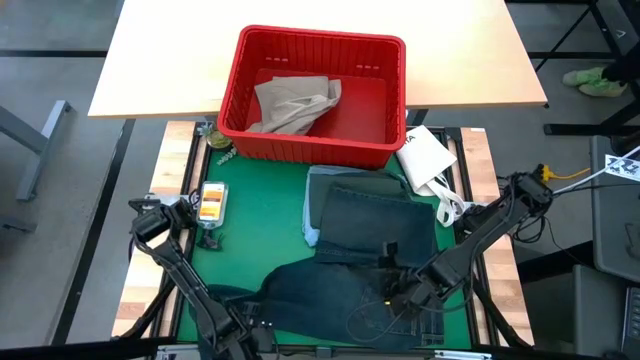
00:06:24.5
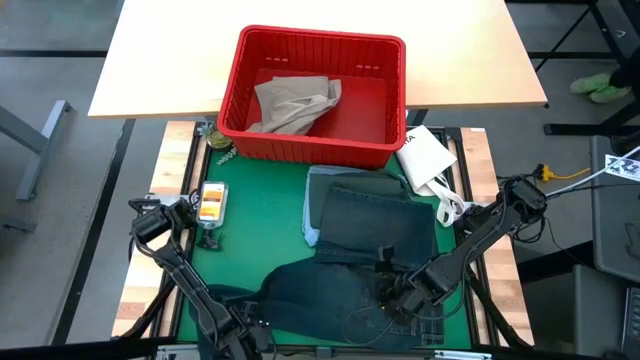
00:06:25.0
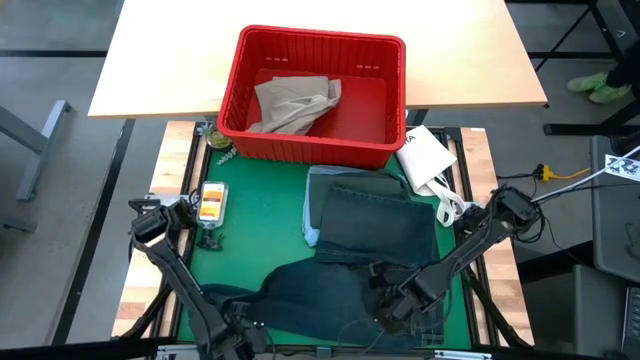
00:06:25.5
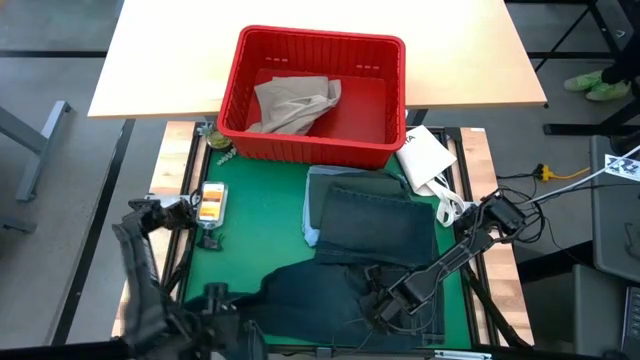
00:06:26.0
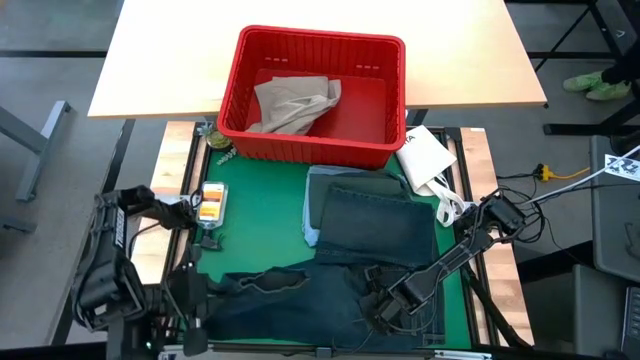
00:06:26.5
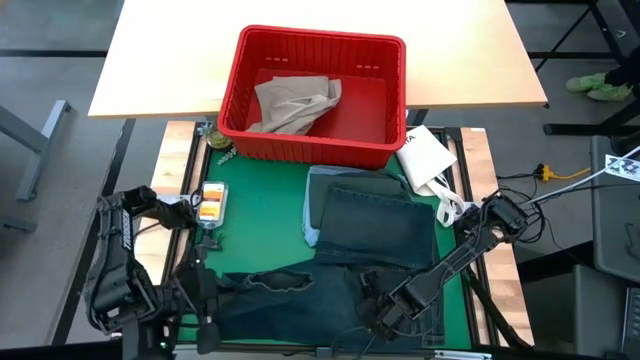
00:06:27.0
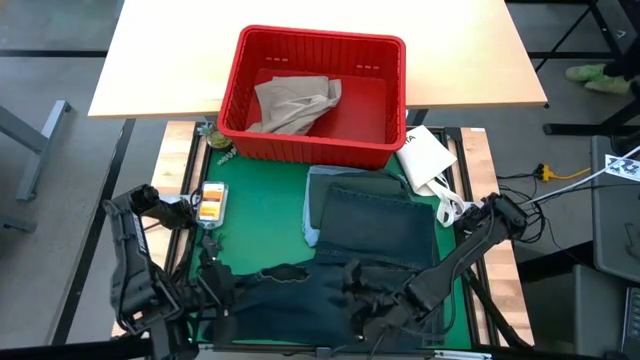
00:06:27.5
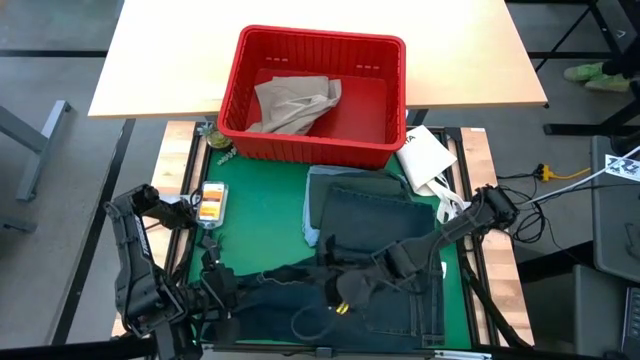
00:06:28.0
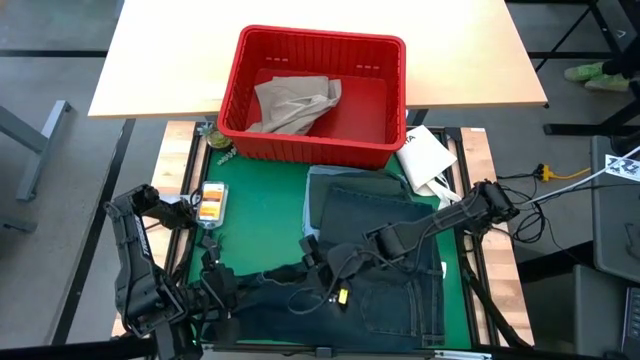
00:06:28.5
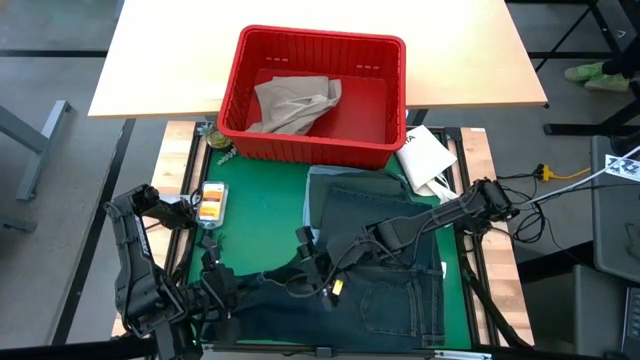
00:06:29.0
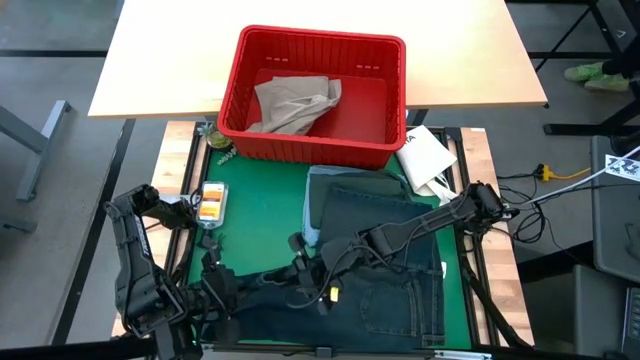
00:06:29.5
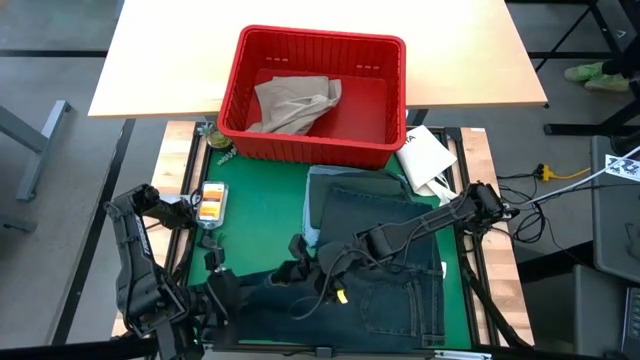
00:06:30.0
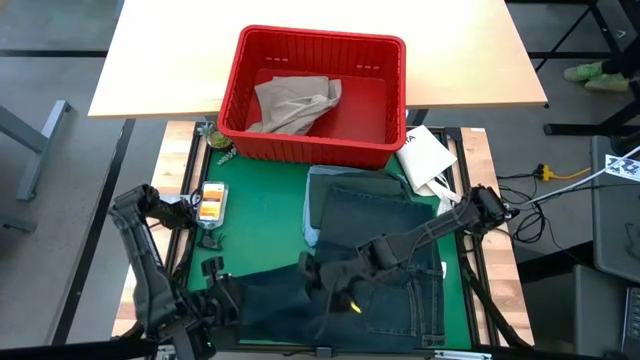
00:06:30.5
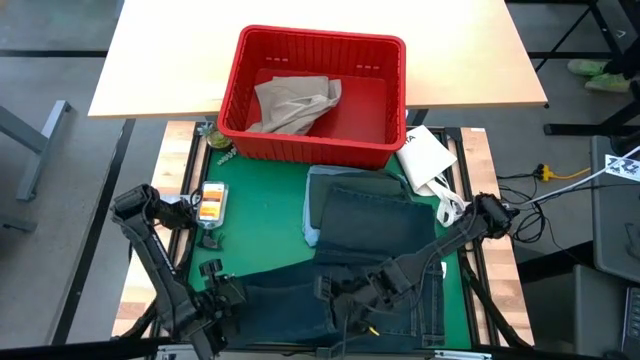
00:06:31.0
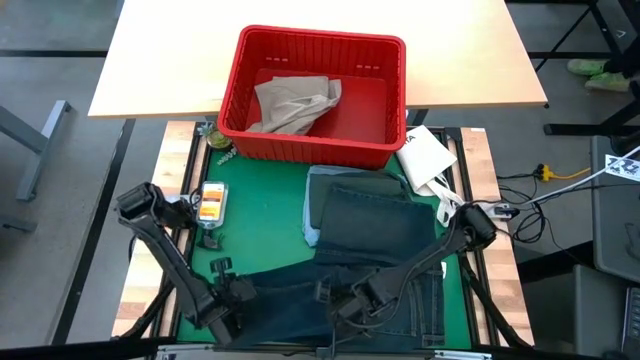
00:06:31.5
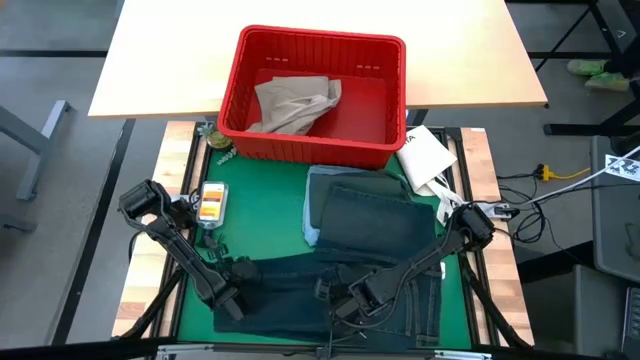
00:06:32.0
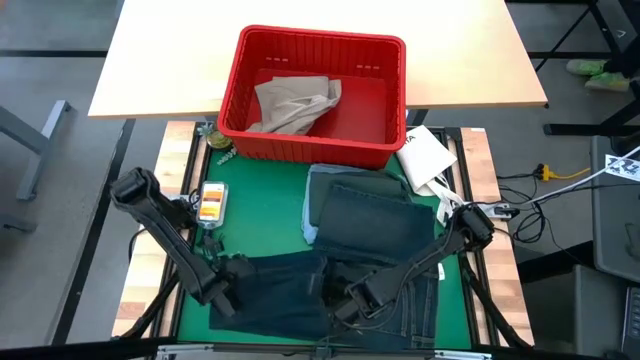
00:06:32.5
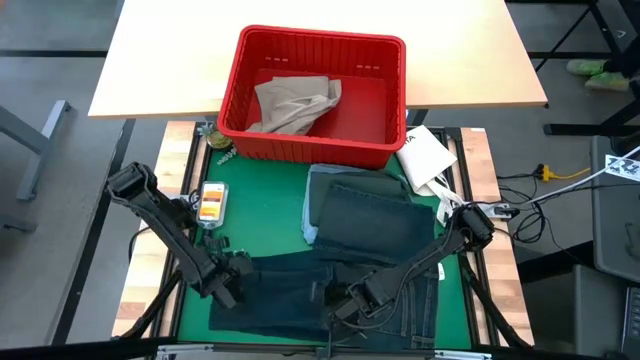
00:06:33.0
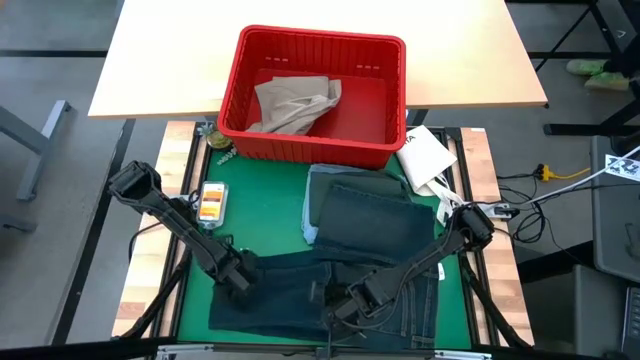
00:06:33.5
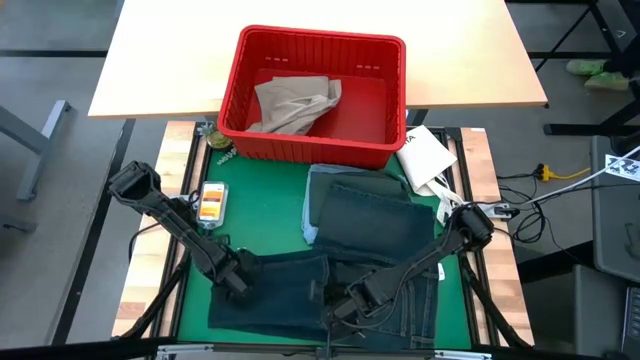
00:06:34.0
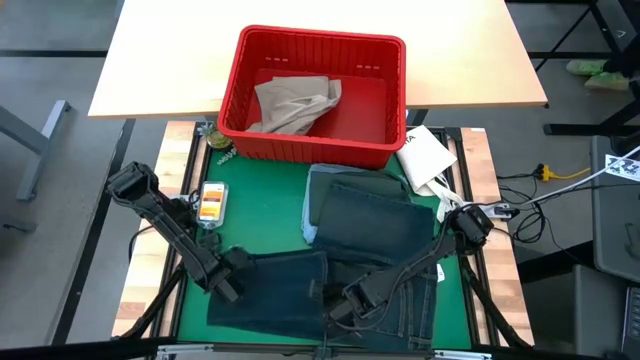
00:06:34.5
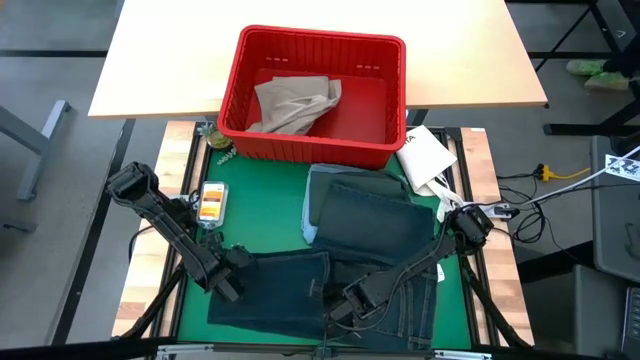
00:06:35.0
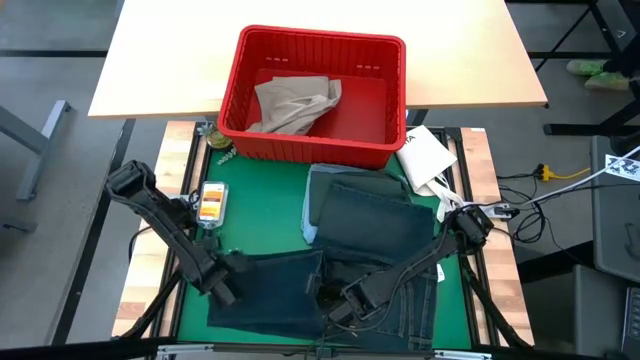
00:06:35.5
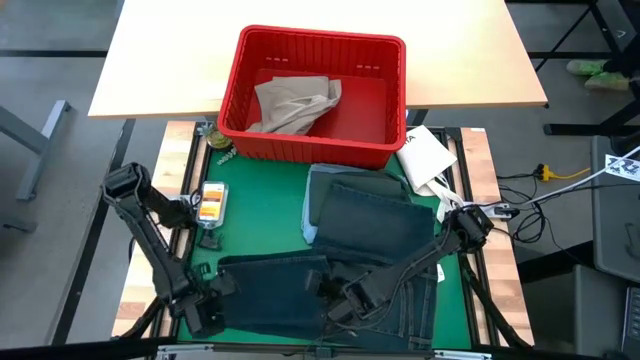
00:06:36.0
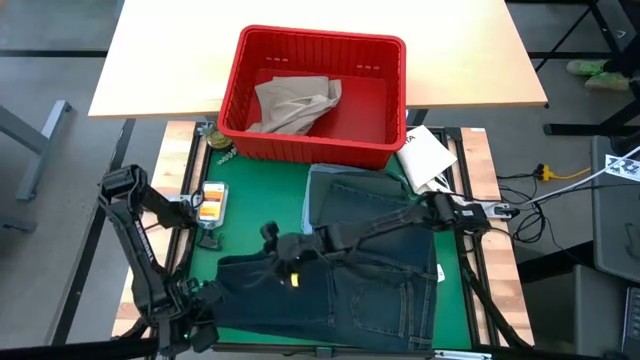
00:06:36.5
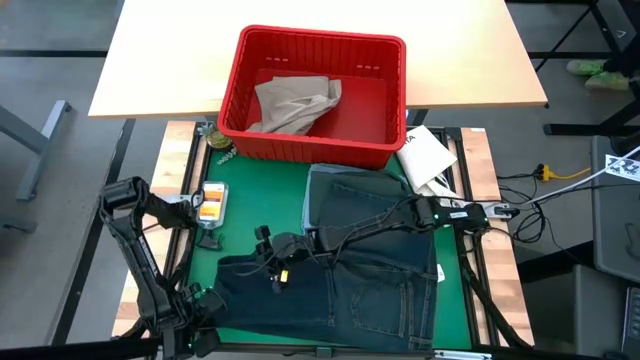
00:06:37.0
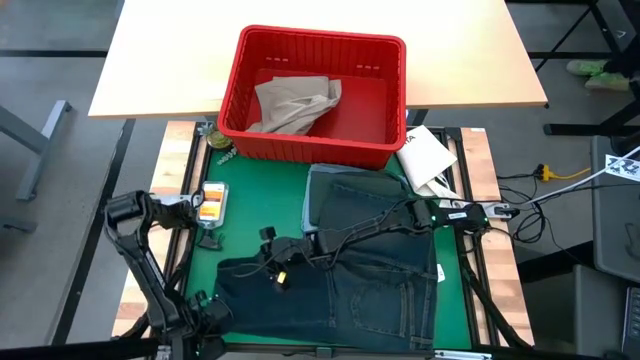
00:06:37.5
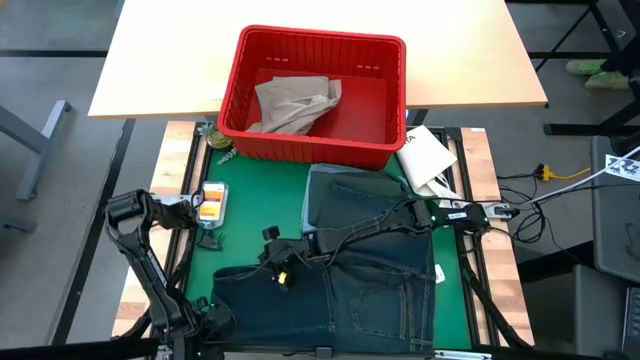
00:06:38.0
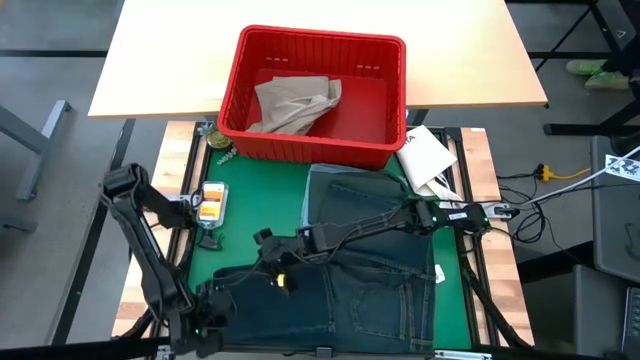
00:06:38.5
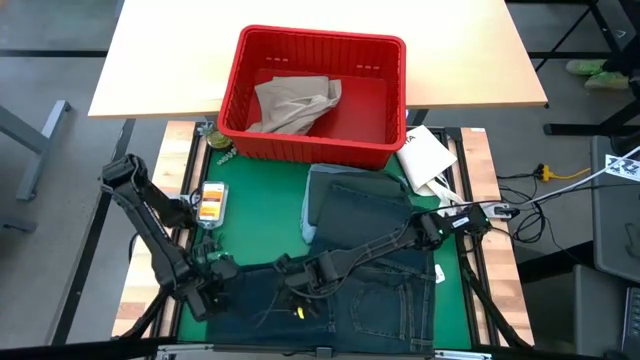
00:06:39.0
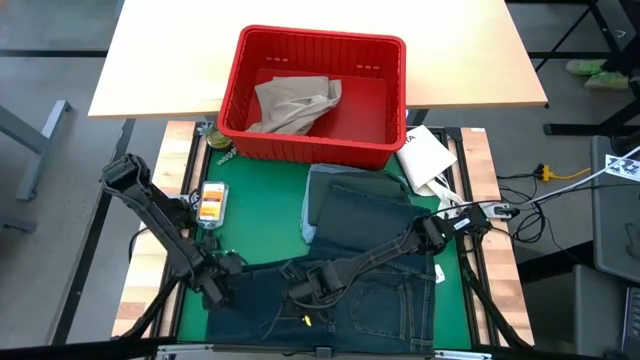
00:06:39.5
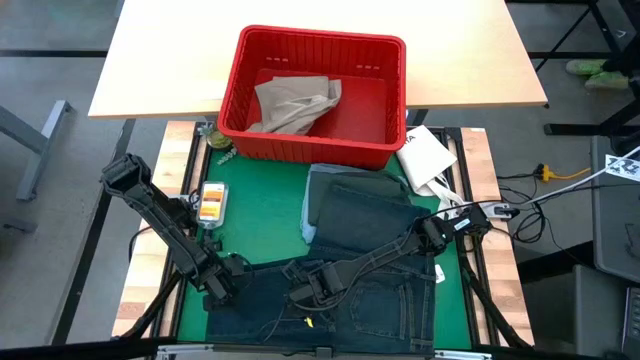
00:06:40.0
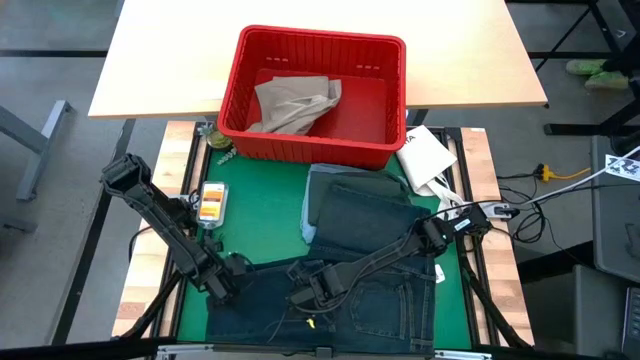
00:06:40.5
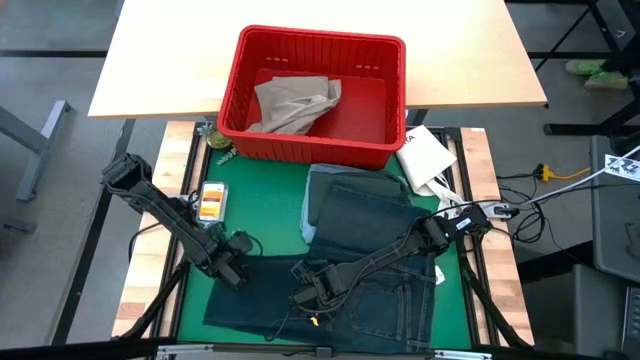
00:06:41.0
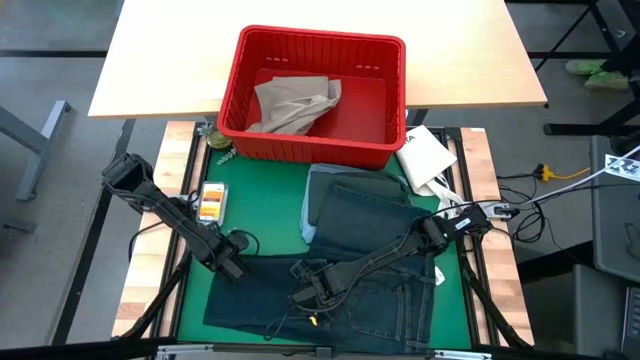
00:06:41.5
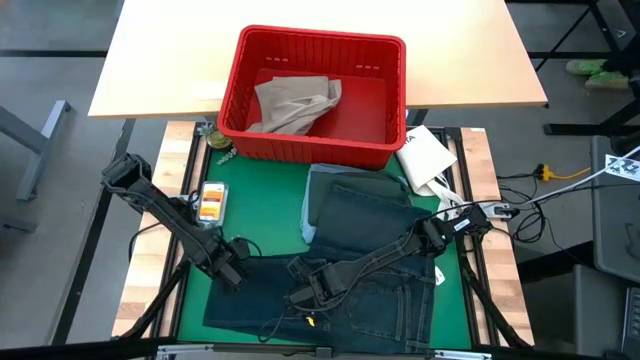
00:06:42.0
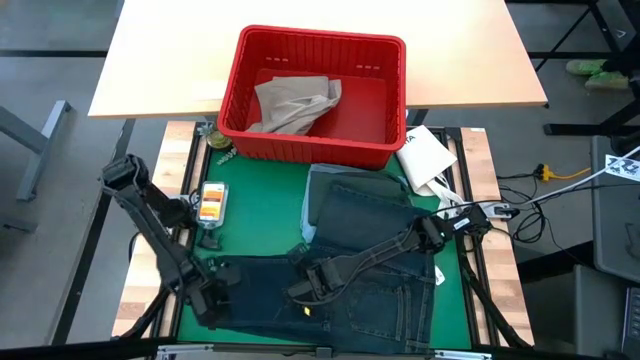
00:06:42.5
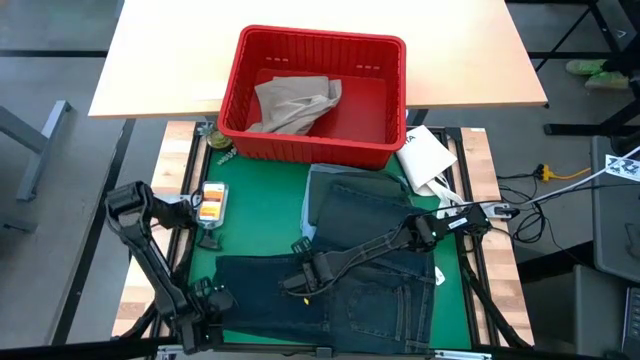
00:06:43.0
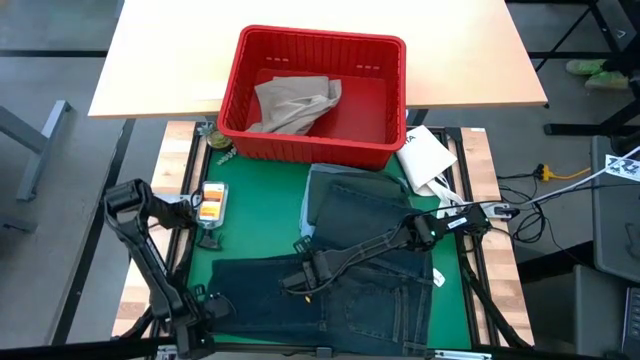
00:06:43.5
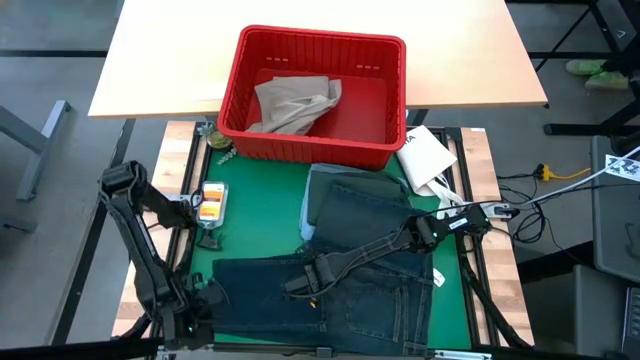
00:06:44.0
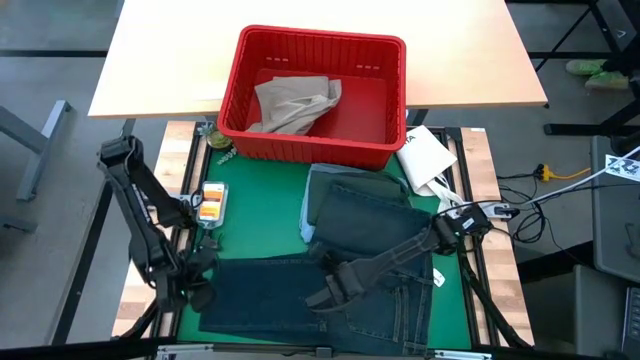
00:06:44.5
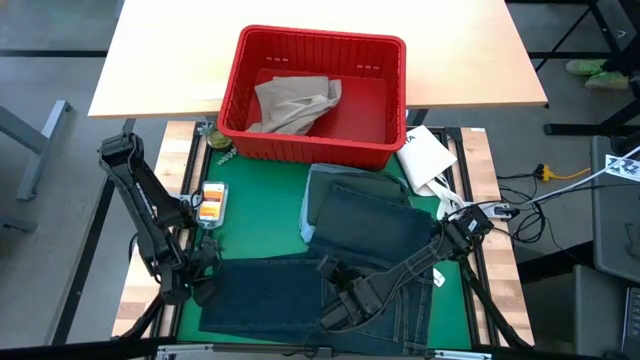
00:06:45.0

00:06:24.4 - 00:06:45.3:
Task: Fold Laundry from Bin
Fold the dark blue pants
